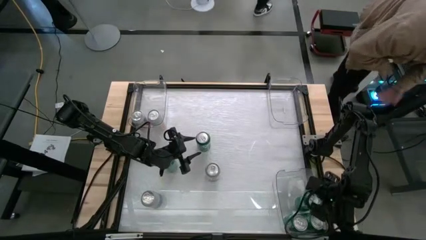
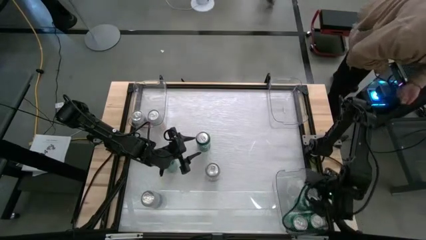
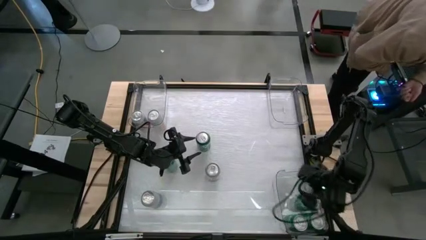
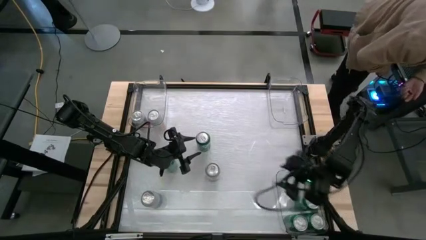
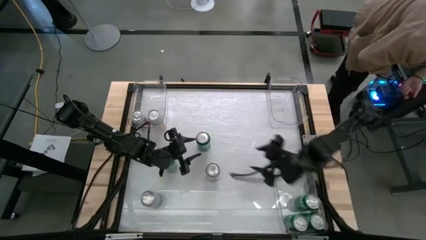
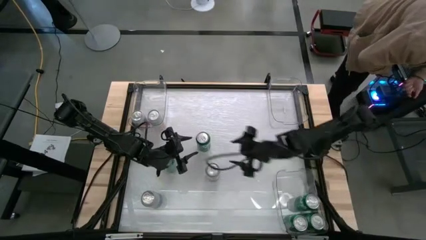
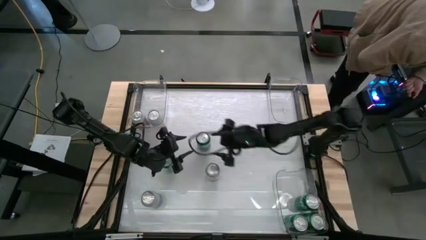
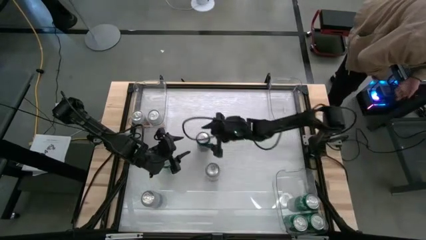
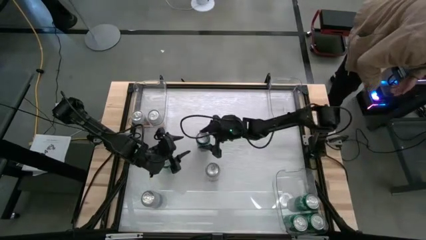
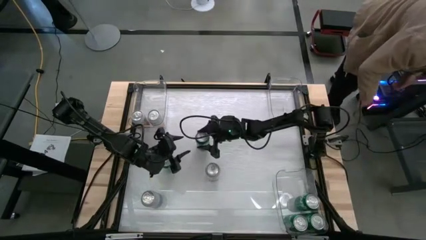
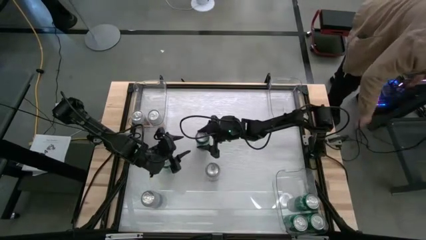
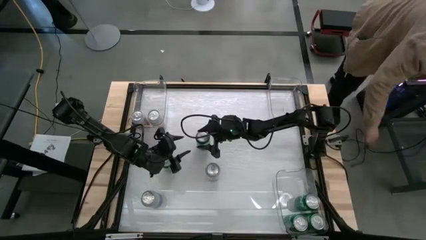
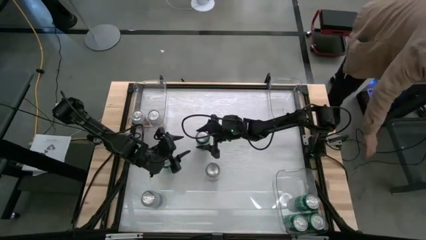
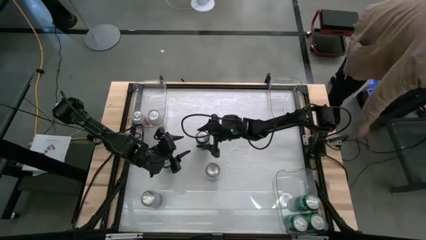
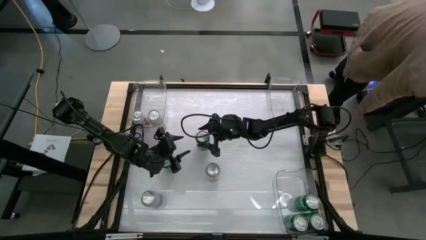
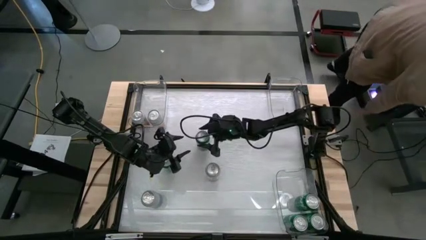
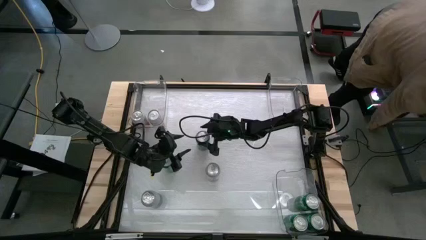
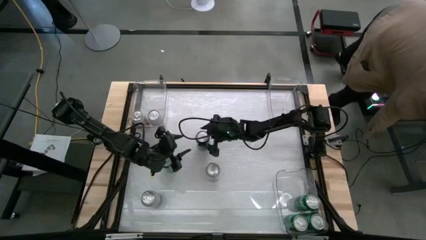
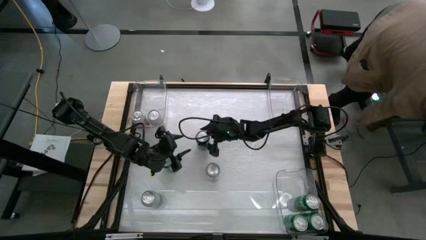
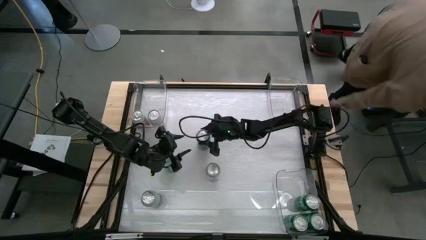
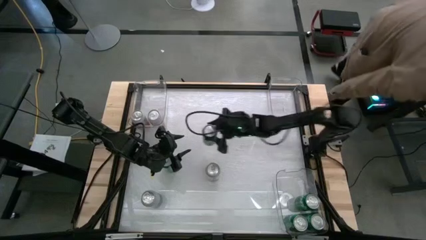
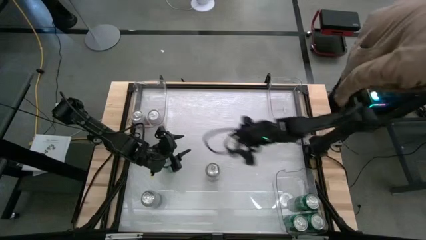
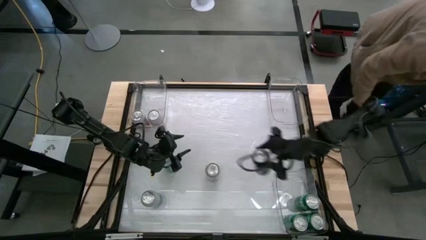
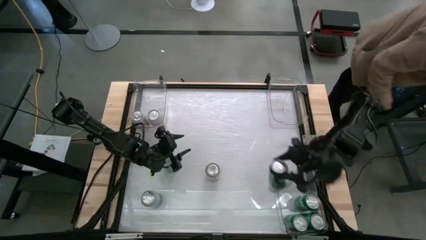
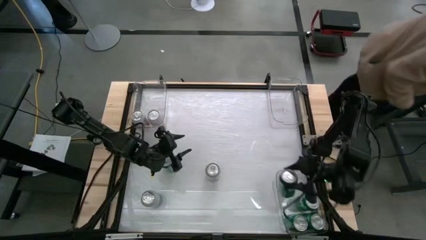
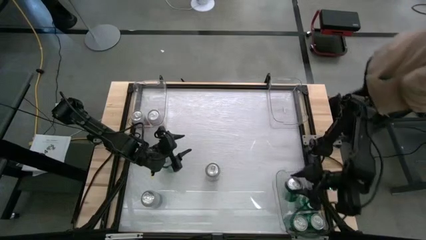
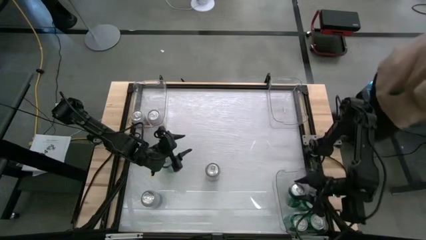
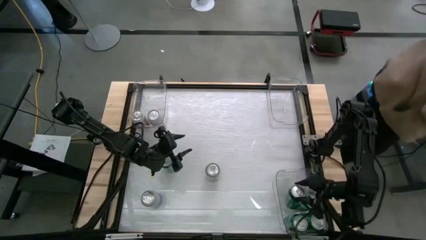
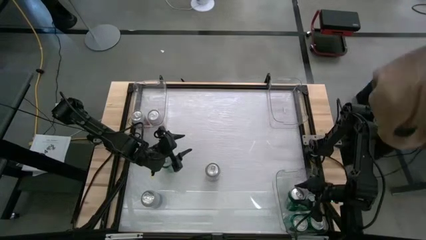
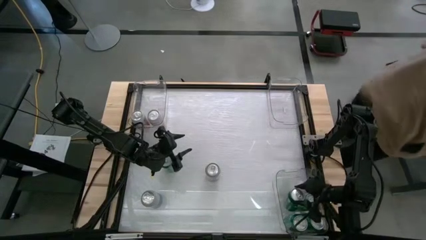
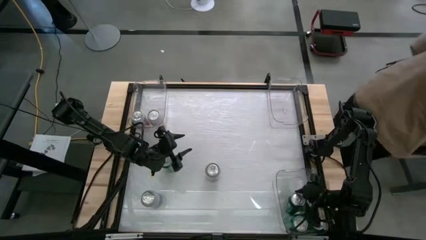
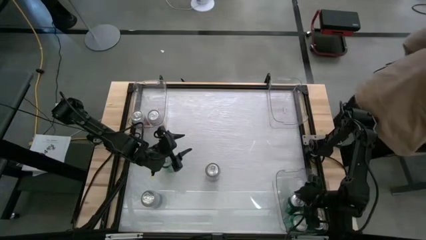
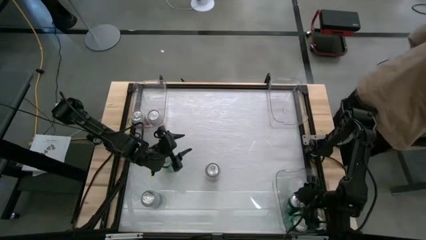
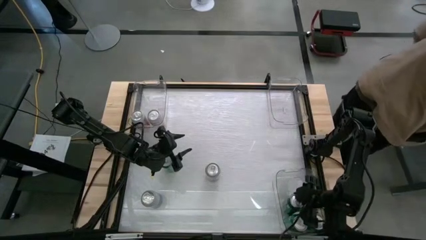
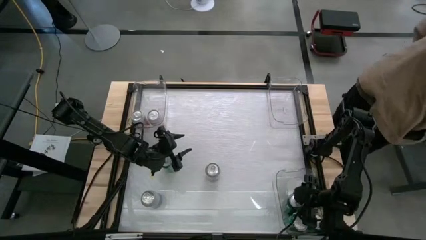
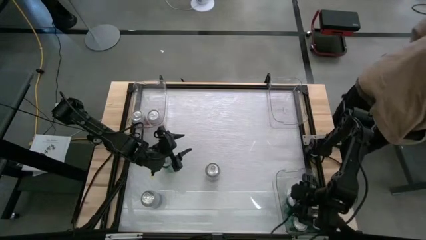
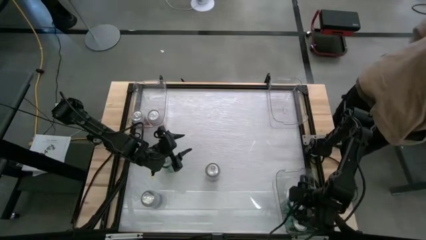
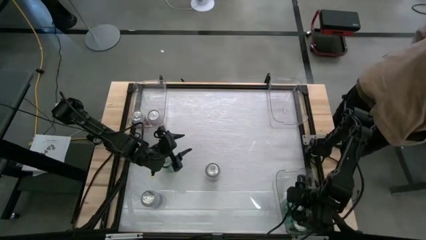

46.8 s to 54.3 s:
Task: Sort soda cans
Put the green soda can into the bottom transparent bin

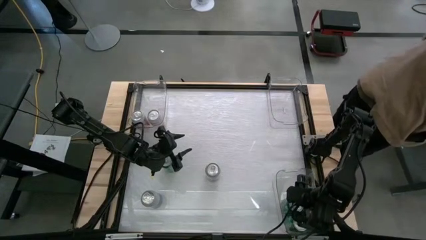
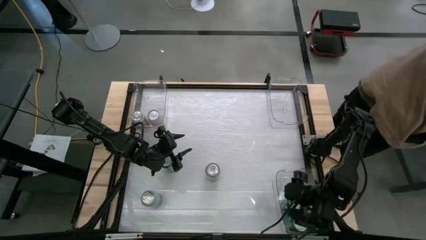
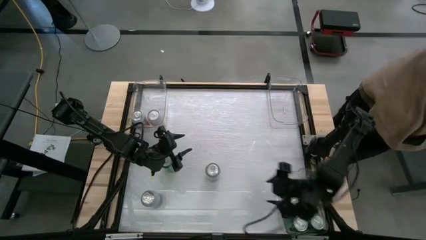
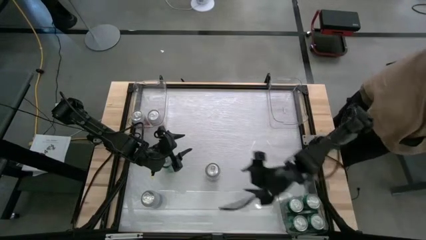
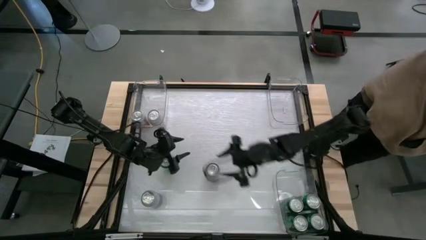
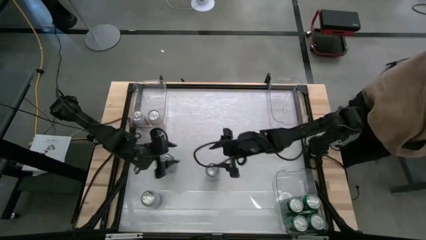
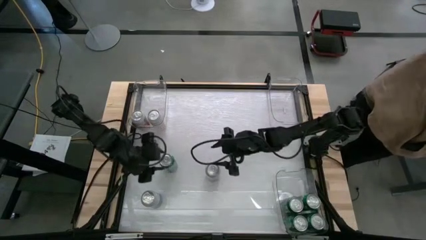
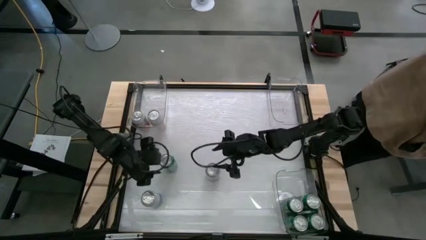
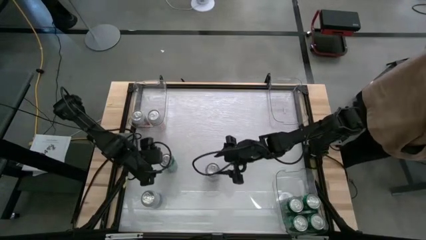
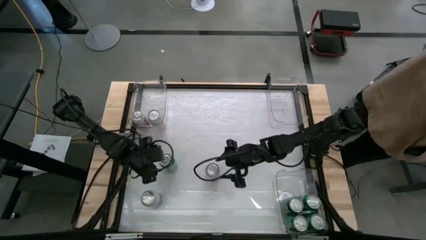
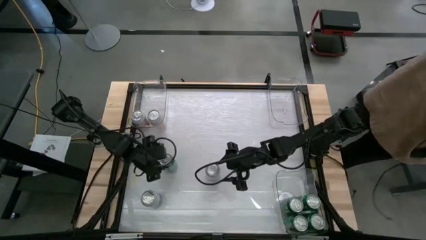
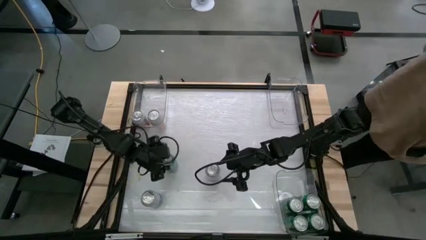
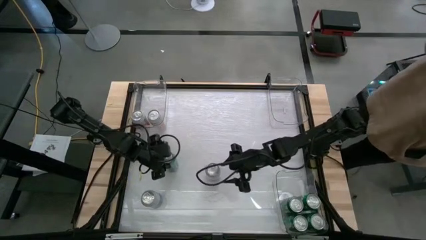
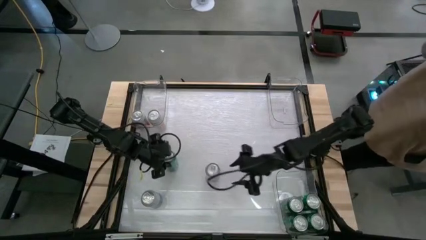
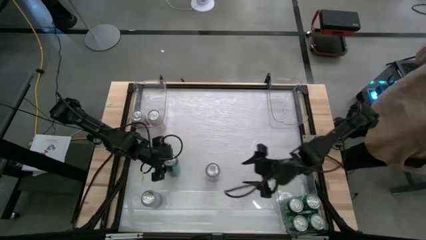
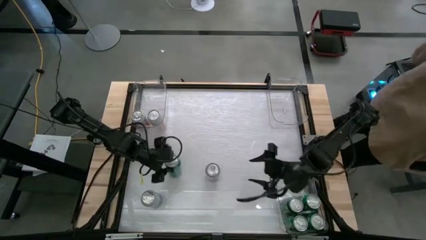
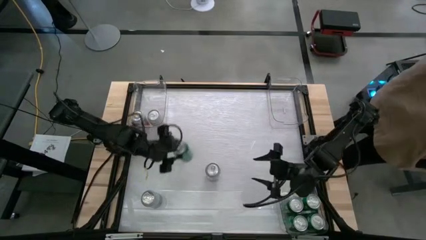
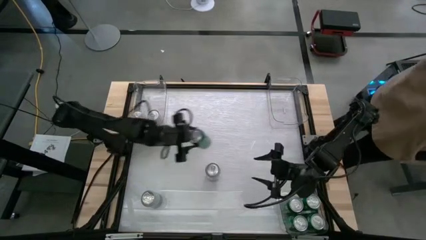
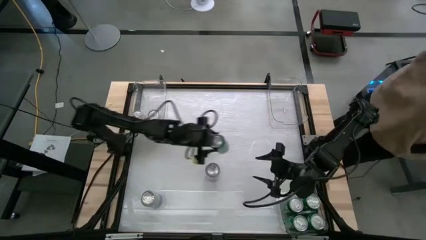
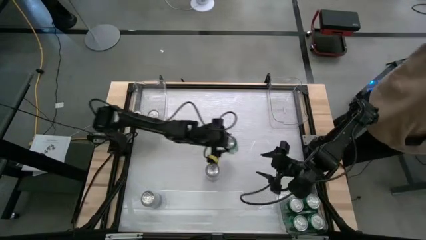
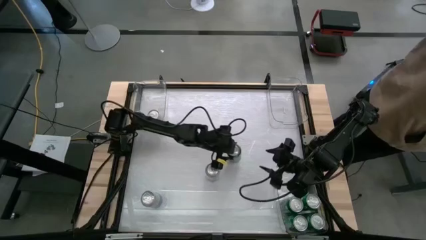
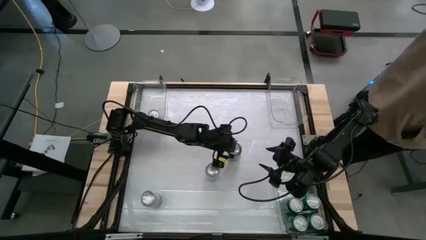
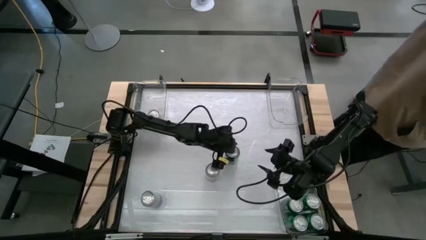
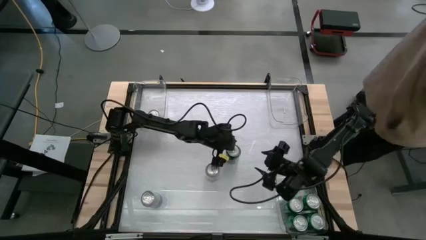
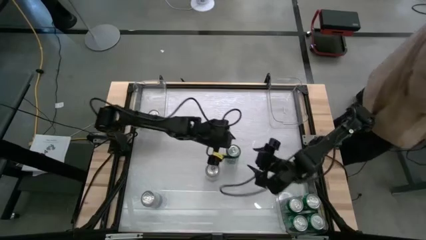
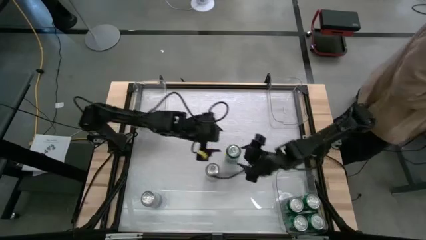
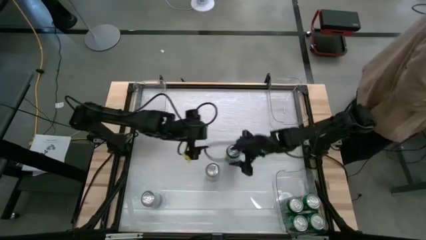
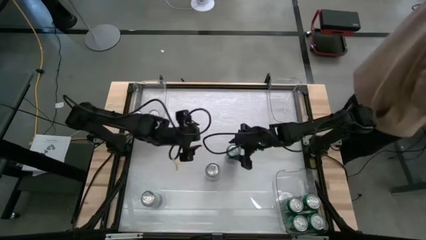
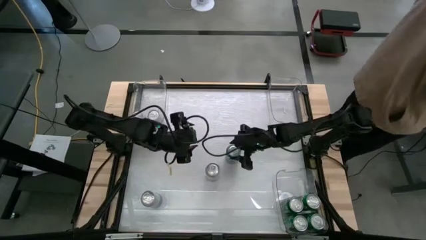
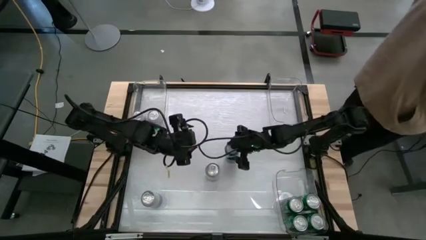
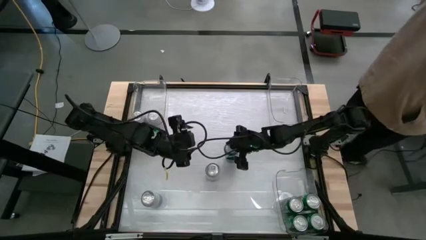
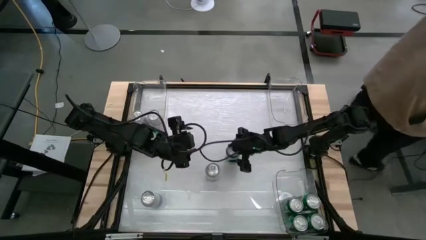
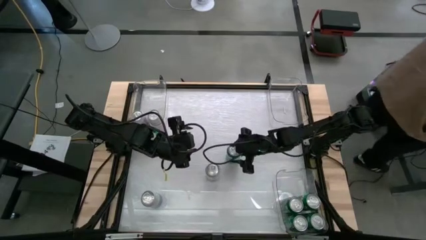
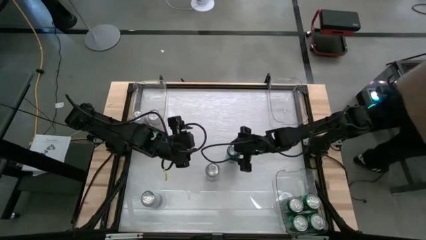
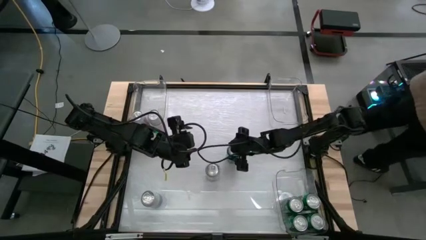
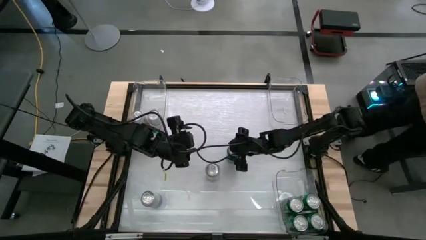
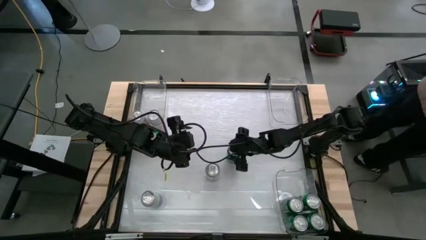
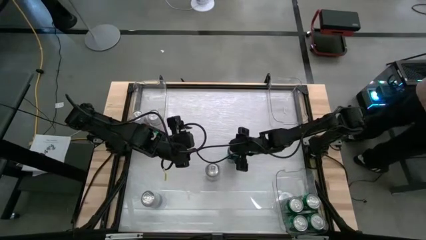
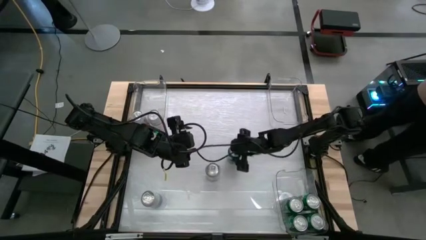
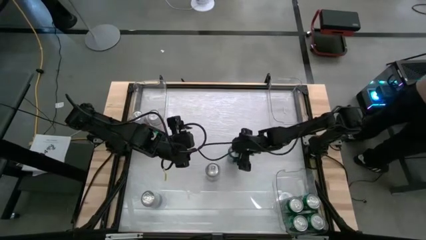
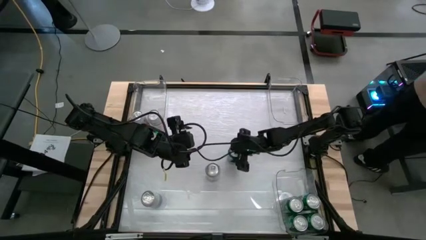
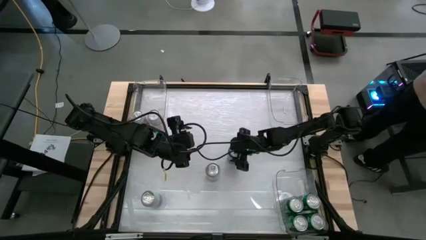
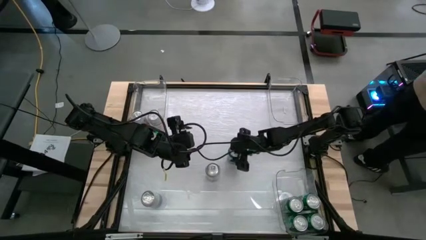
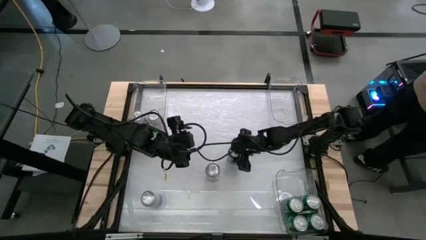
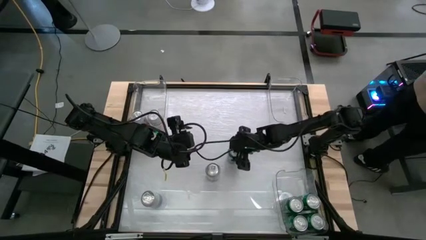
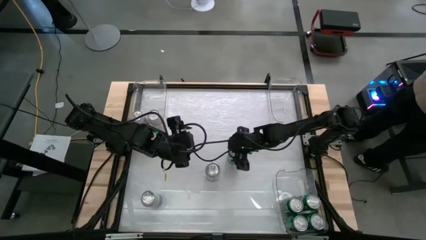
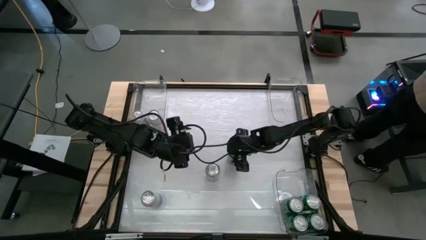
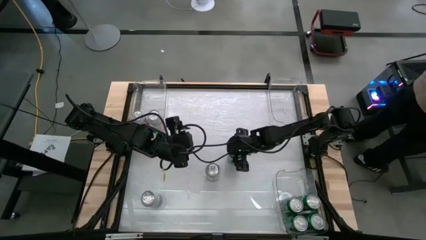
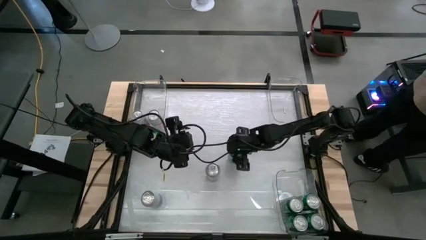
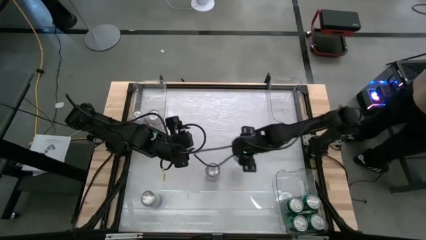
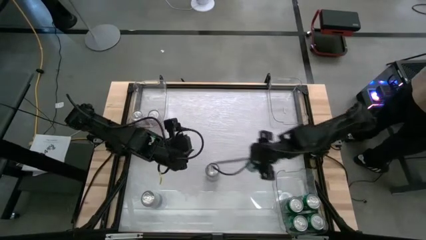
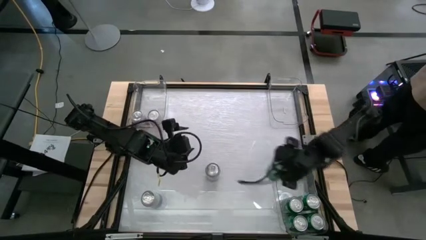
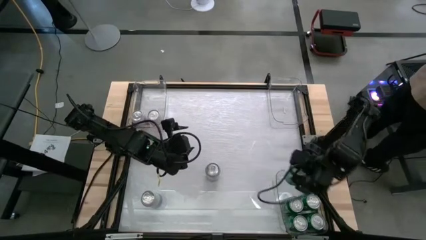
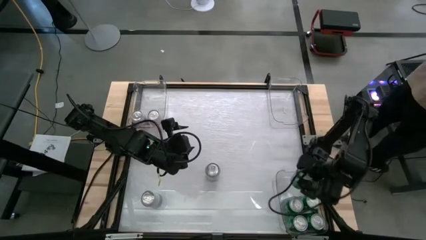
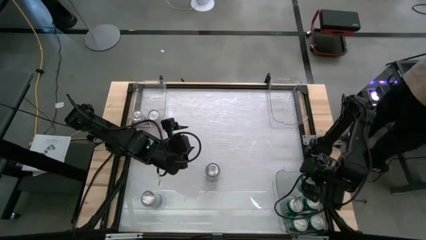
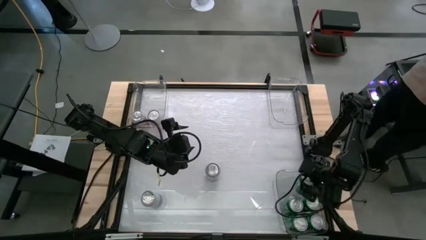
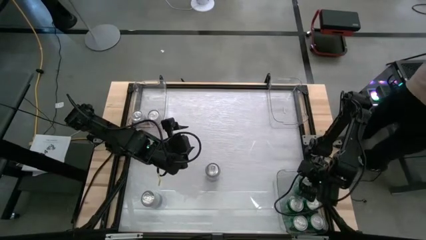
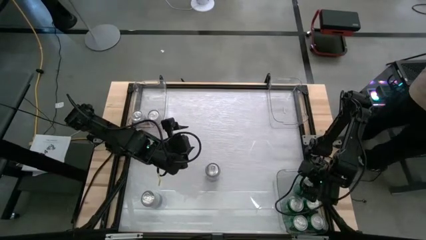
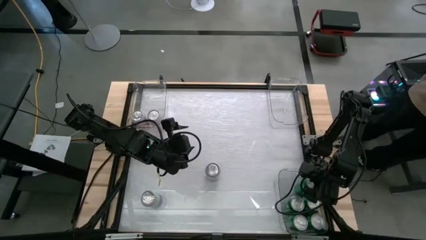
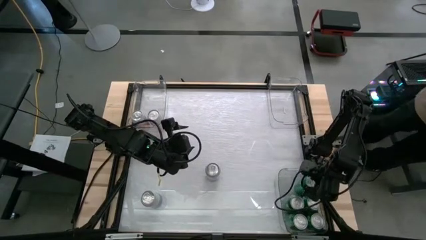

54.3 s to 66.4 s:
Put the green soda can into the bottom transparent bin
